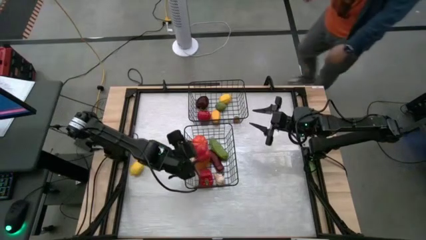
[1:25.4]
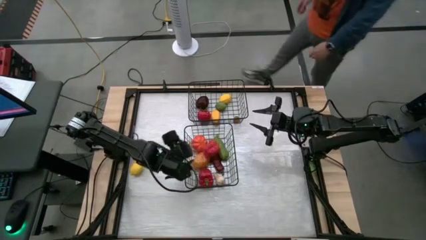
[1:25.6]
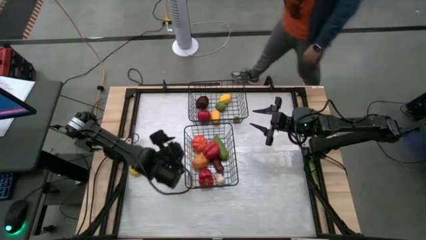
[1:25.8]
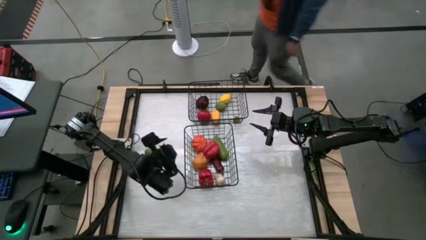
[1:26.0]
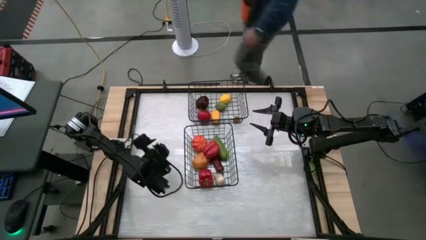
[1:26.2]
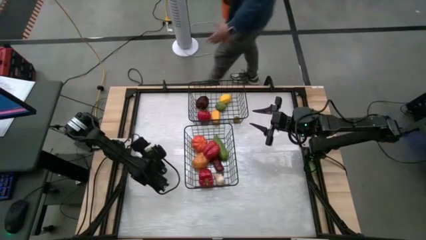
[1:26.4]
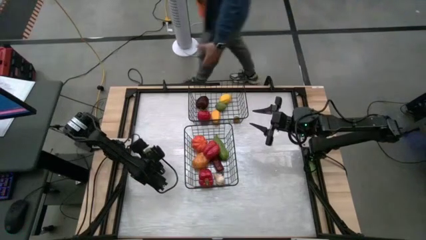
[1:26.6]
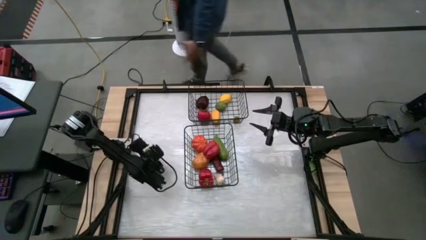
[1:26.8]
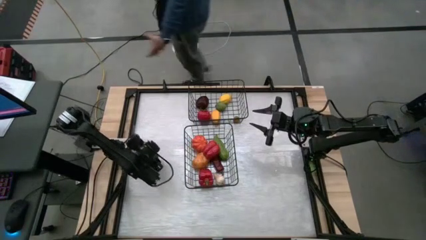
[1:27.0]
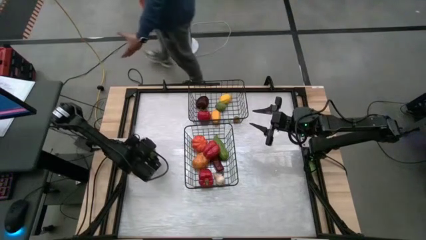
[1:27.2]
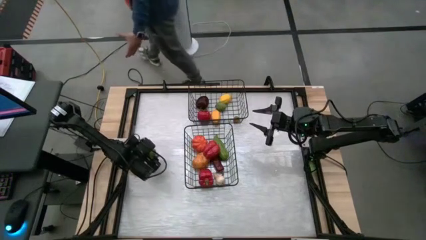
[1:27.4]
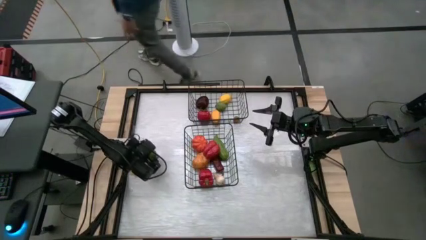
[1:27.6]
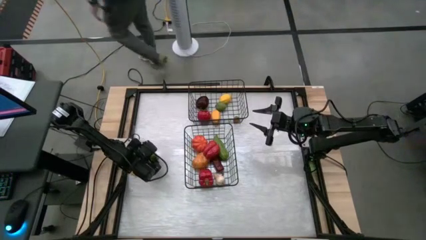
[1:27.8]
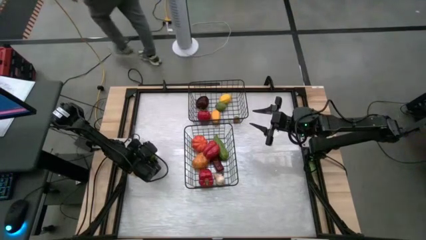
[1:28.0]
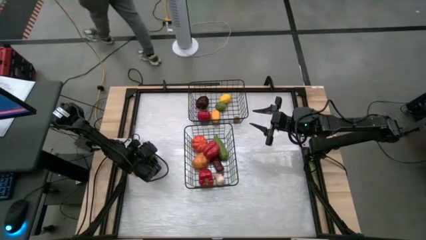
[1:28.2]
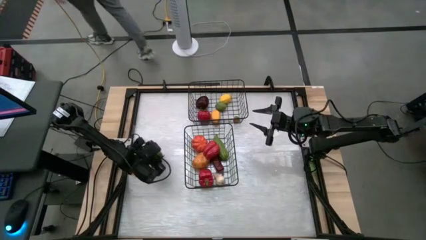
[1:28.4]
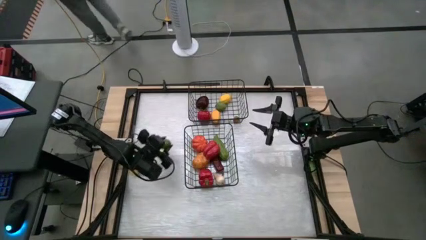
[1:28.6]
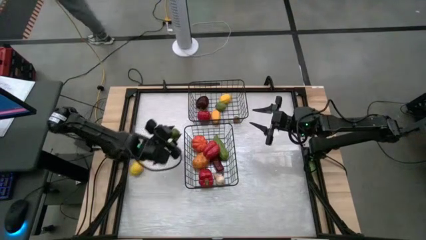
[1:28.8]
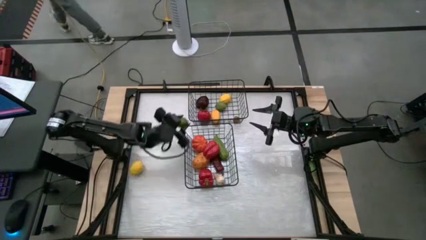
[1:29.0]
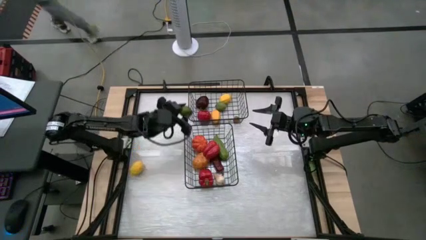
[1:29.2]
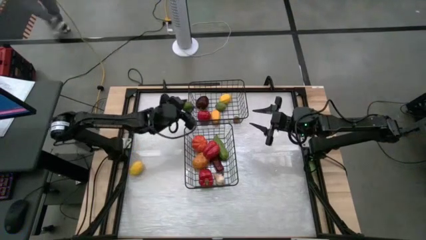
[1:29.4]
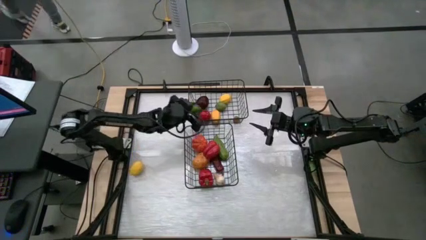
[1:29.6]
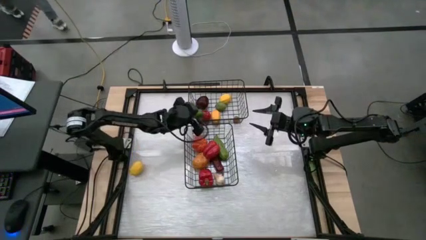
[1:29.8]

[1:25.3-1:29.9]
Task: Sort produce into baskets
Put the green lime into the top wire basket

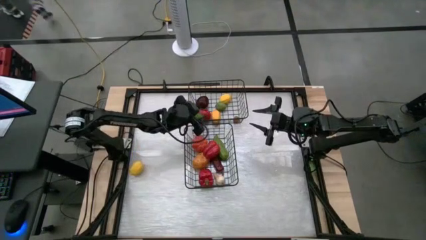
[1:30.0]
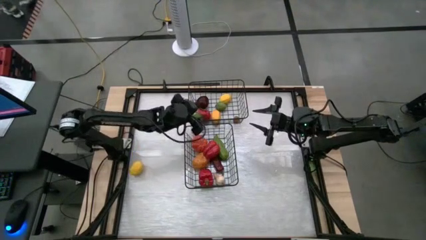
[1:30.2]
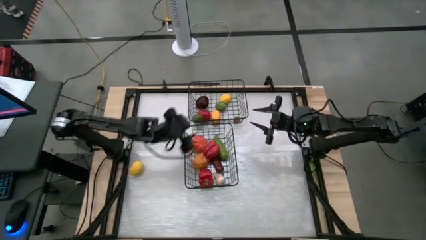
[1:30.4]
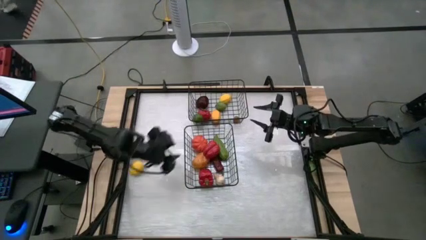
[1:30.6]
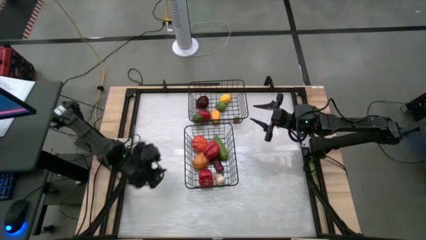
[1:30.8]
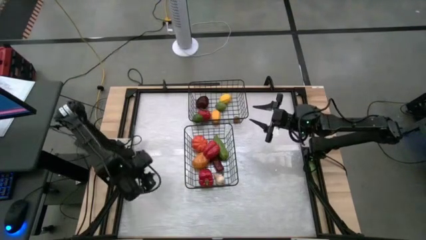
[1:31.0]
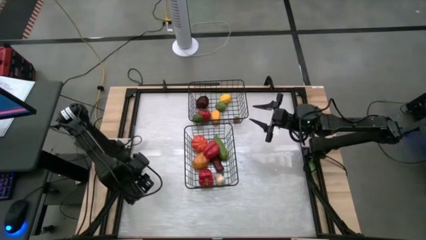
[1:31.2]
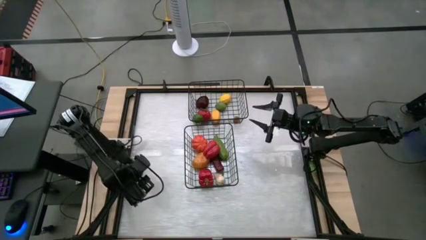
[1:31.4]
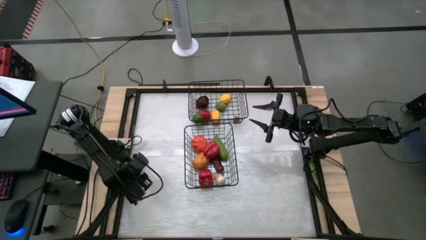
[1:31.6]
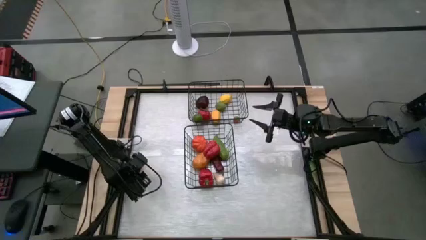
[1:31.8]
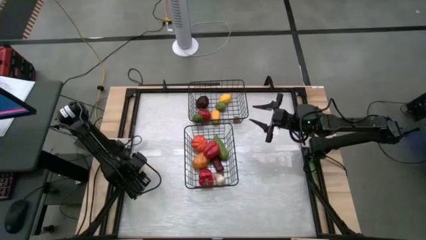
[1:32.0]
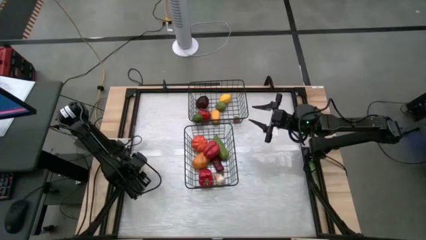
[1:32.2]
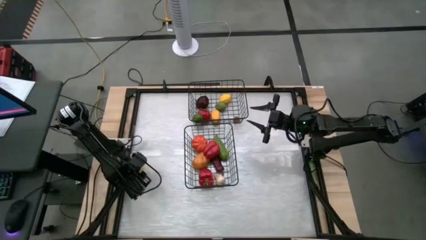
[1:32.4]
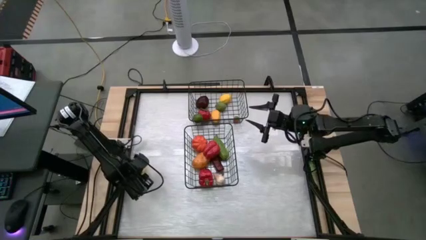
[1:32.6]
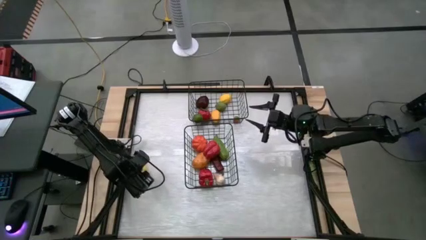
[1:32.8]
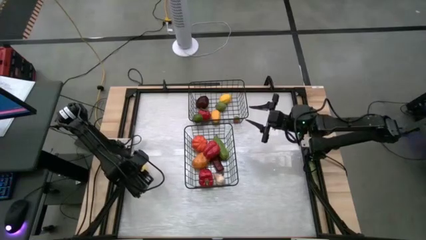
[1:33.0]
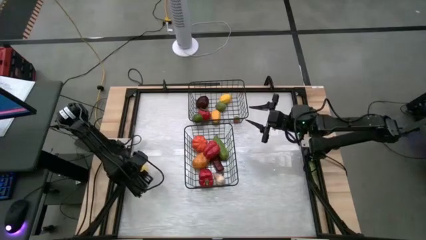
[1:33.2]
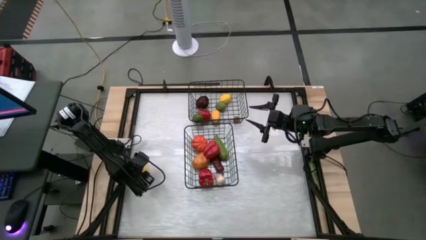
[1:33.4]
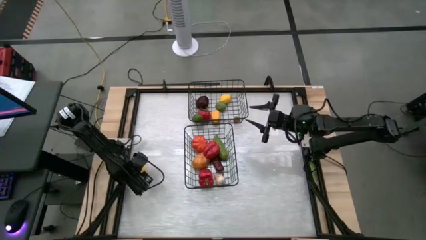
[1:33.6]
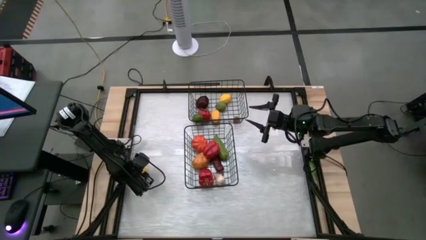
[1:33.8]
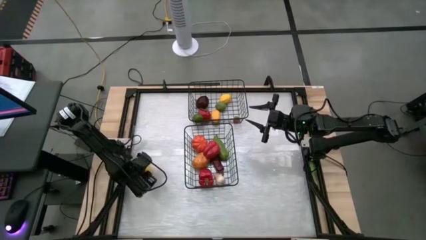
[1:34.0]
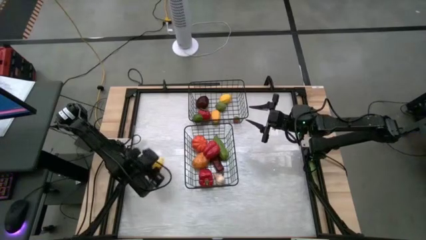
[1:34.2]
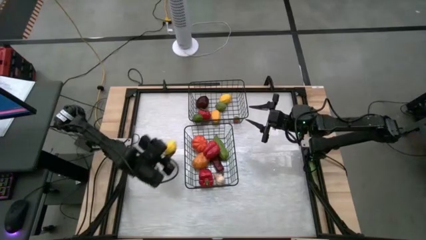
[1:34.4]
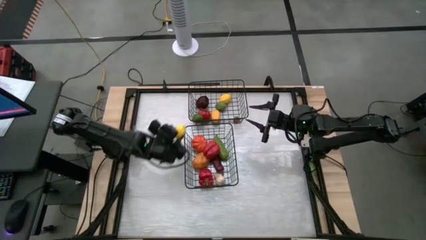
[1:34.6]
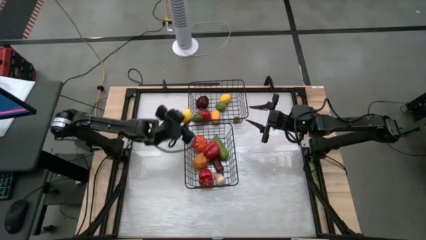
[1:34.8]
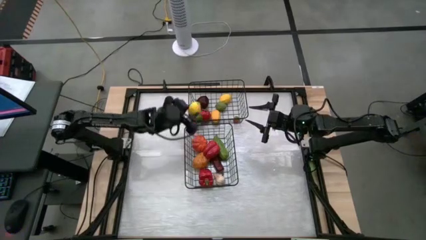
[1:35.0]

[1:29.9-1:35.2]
Put the yellow lemon into the top wire basket

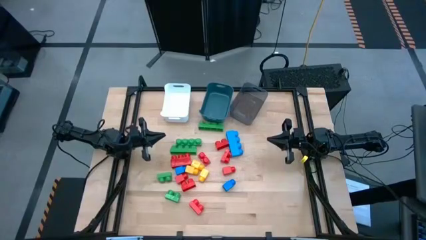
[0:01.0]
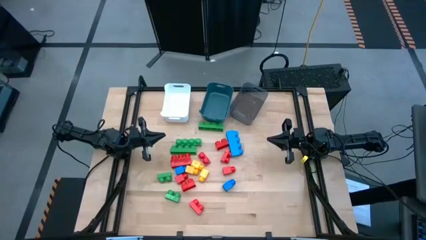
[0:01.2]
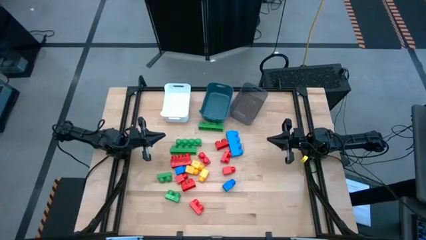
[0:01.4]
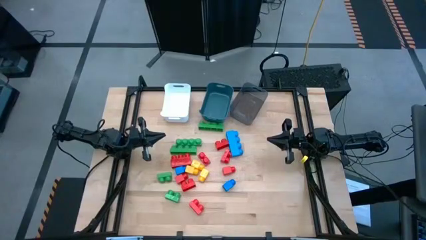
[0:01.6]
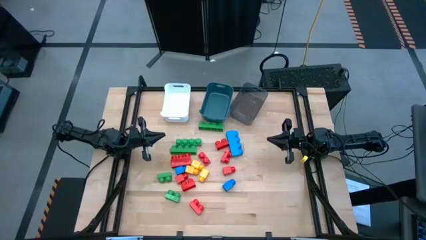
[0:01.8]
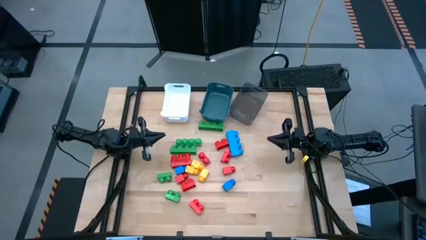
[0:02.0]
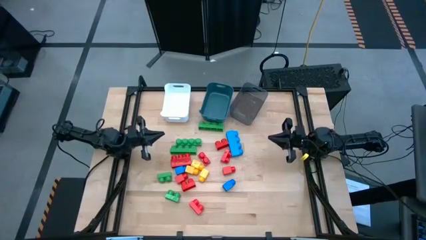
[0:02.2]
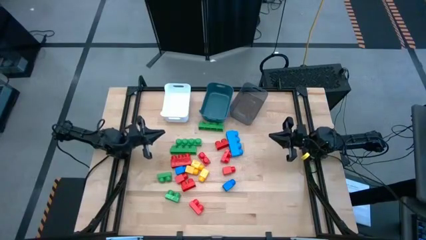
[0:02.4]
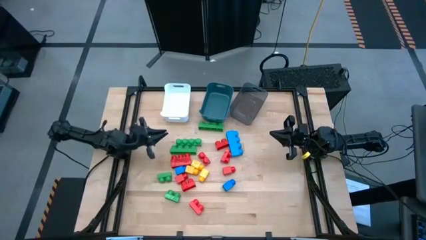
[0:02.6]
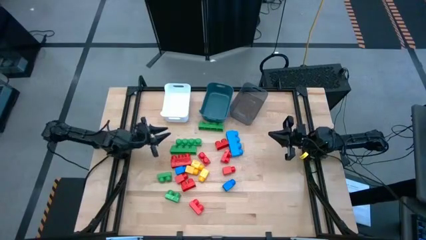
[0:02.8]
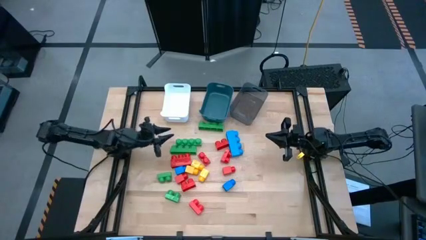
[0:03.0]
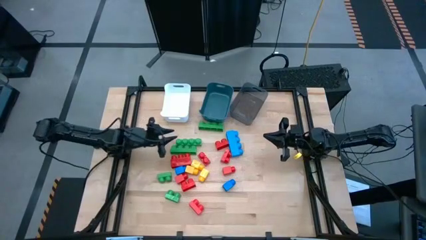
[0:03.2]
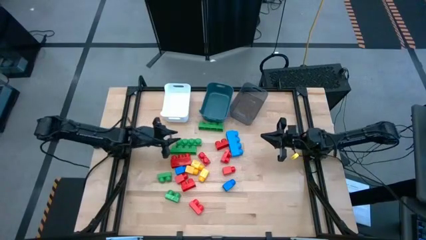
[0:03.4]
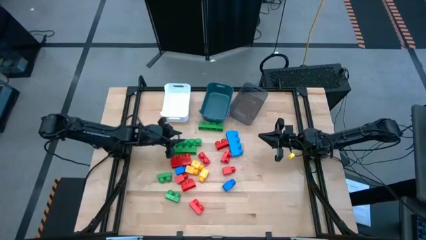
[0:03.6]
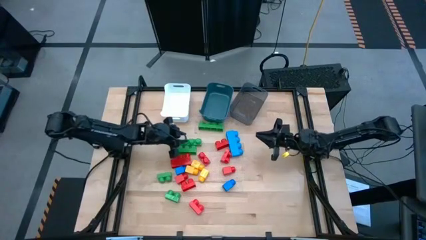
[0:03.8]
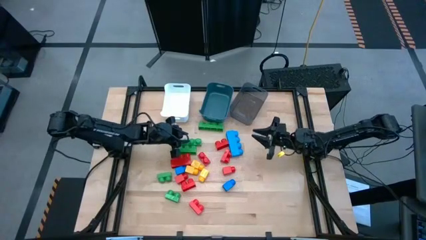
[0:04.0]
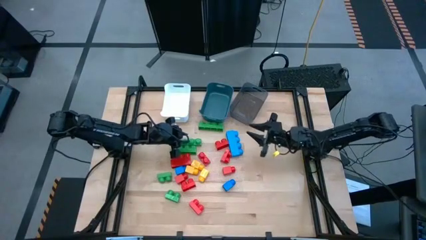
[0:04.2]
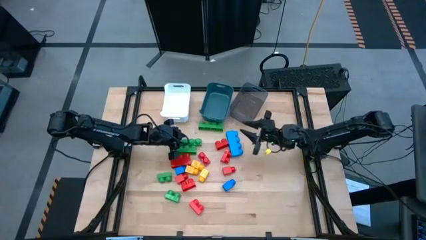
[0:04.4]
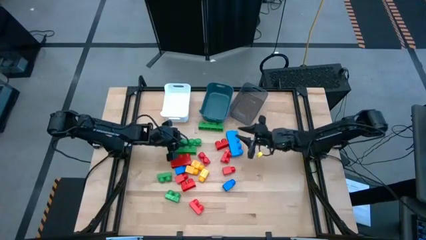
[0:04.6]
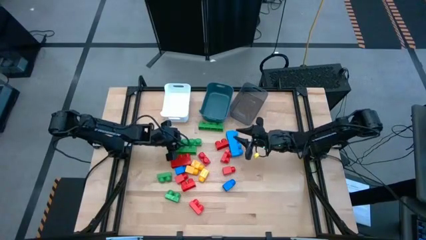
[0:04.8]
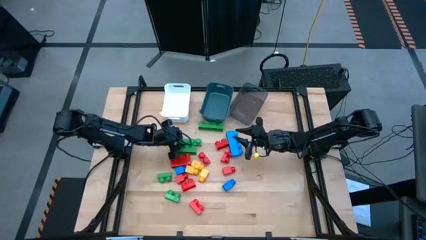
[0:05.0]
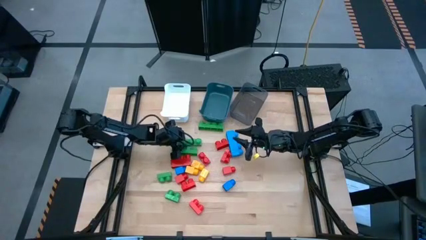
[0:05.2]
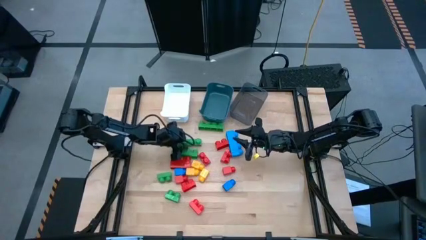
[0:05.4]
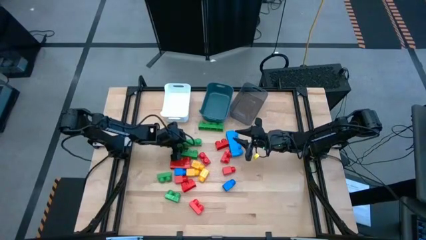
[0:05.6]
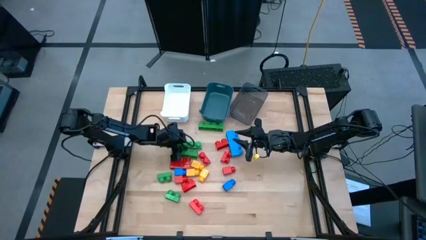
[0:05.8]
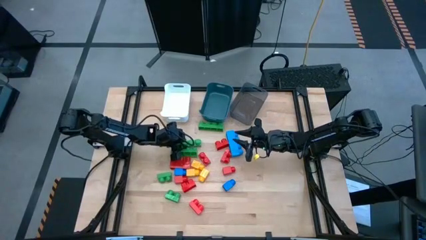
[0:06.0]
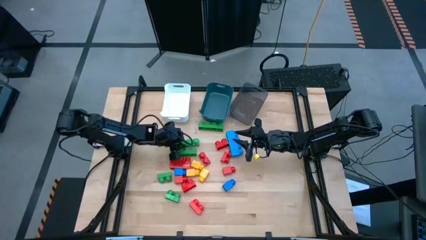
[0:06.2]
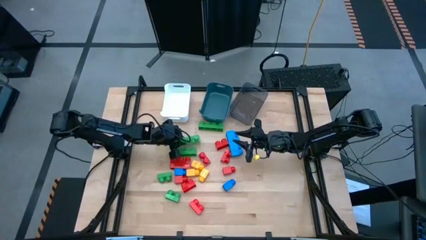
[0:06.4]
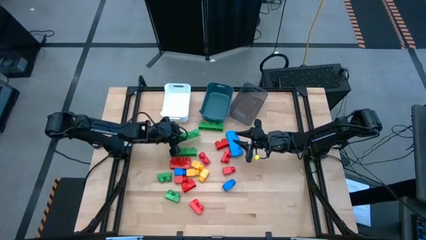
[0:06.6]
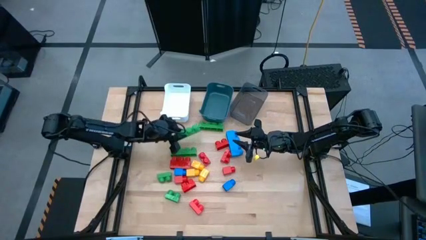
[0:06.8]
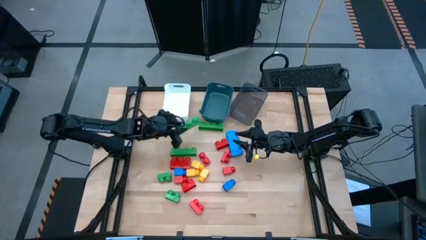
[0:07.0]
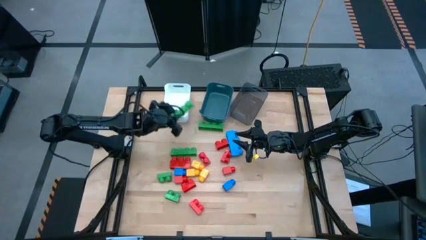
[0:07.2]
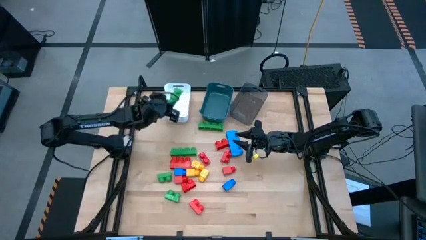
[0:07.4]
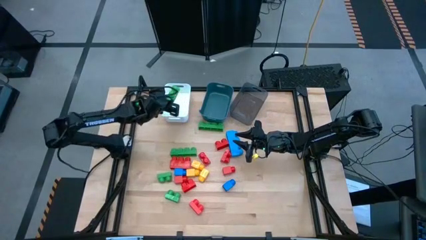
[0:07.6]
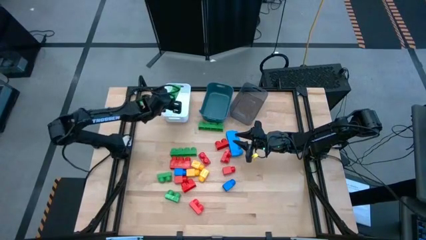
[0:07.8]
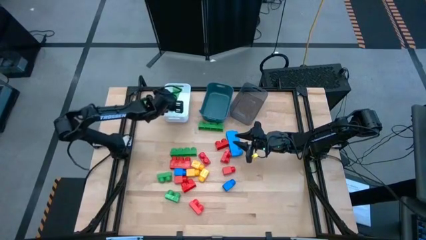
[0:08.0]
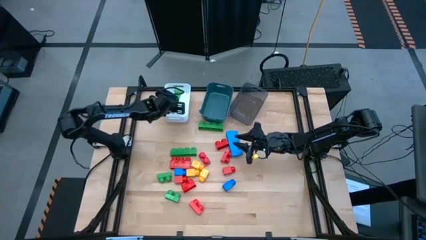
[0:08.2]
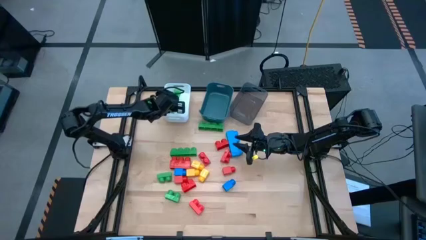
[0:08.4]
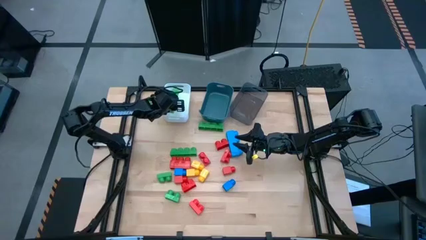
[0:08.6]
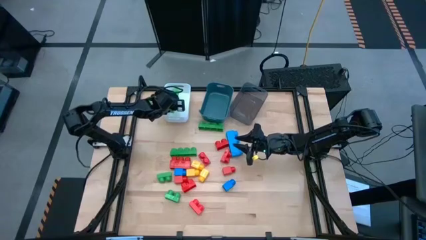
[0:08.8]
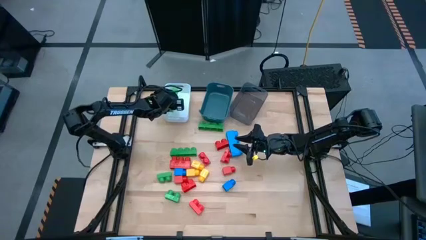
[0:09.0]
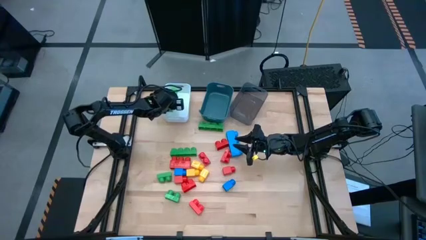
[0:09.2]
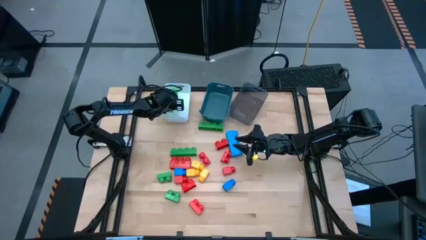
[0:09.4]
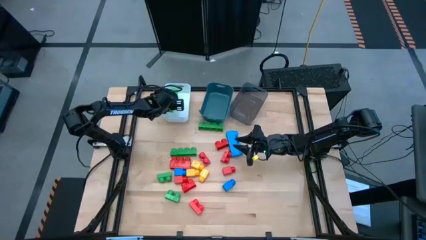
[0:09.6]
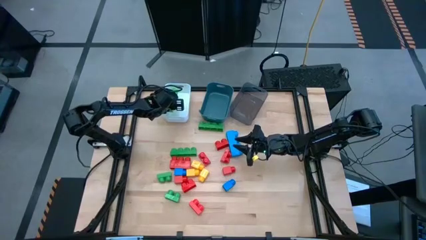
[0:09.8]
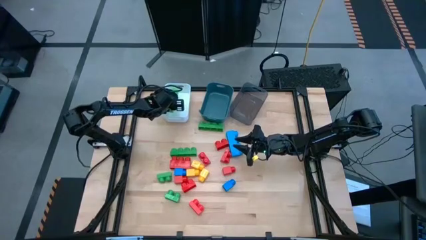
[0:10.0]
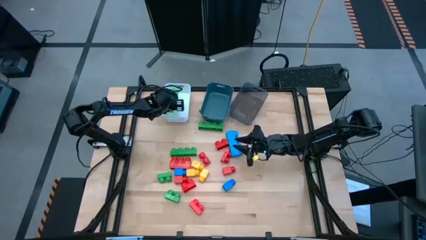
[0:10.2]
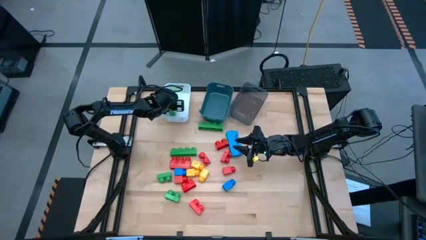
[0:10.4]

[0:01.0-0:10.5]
Task: Sort blocks by size
Put the 4 studs green game piece into the white bin
